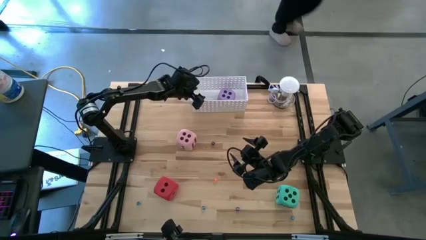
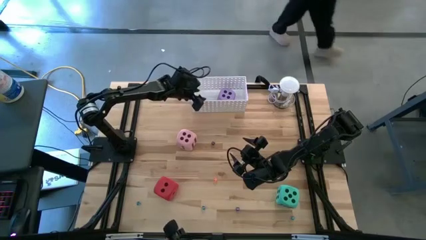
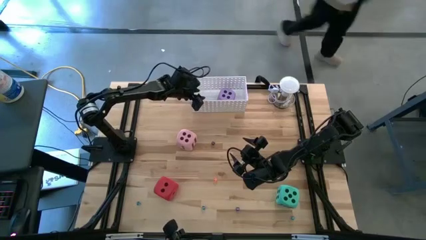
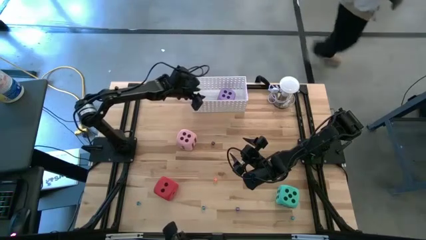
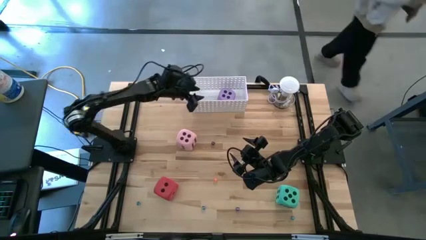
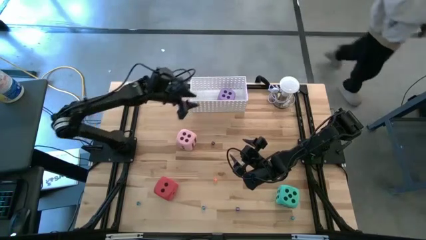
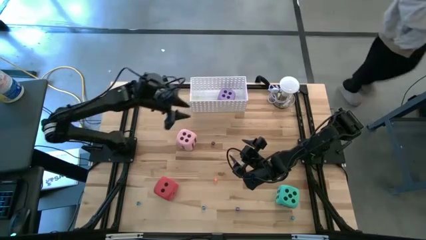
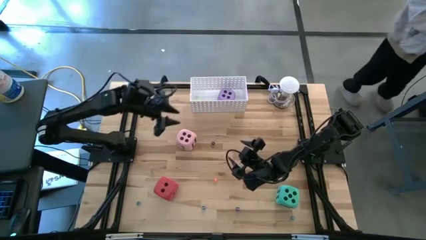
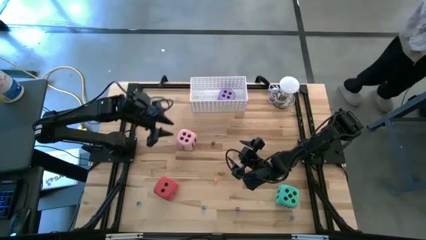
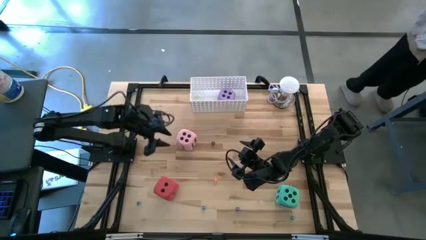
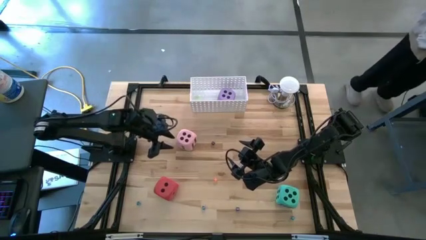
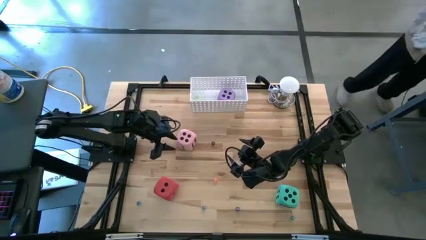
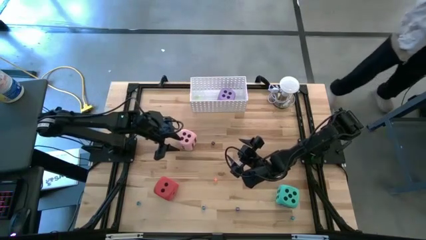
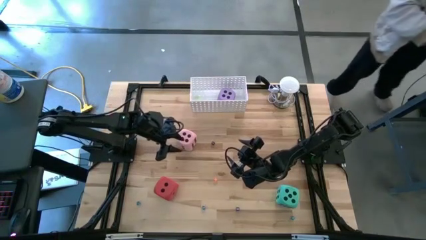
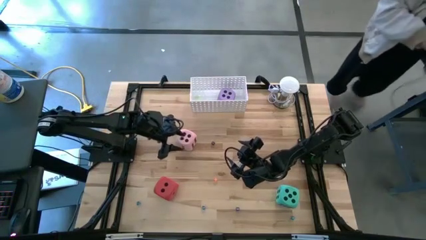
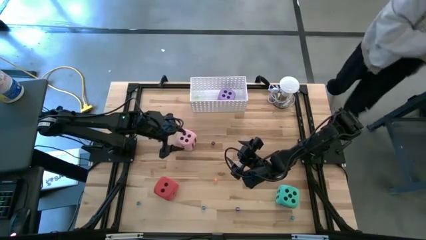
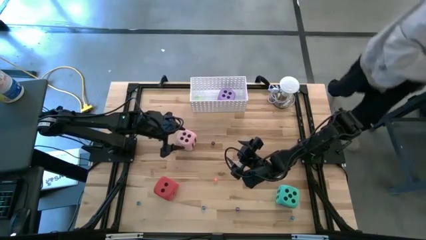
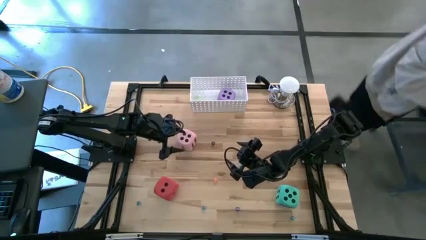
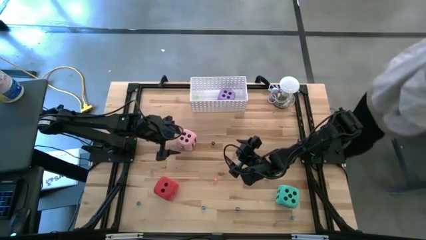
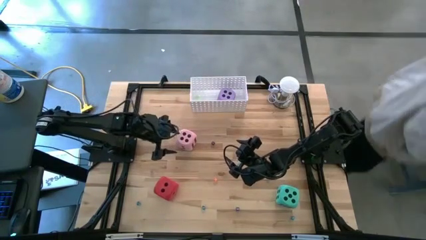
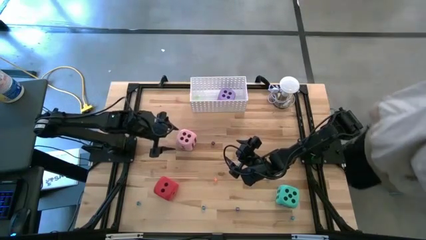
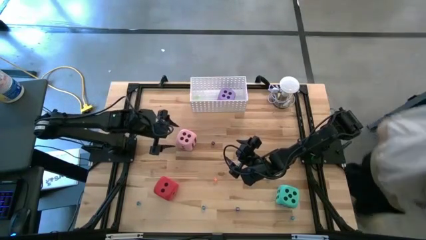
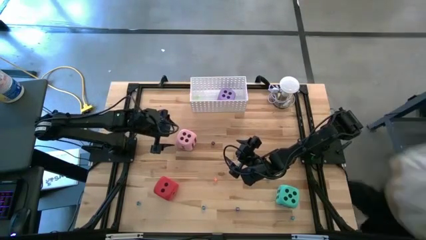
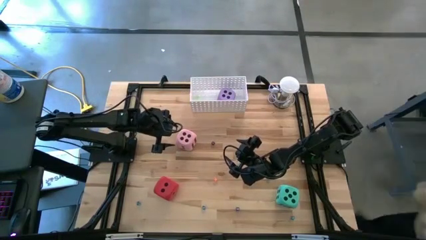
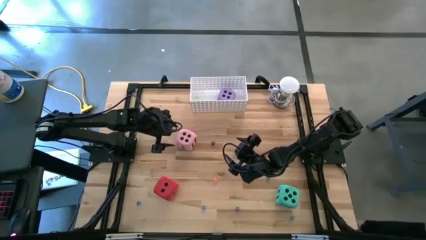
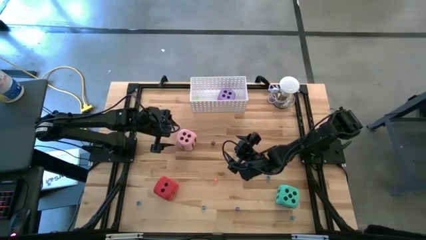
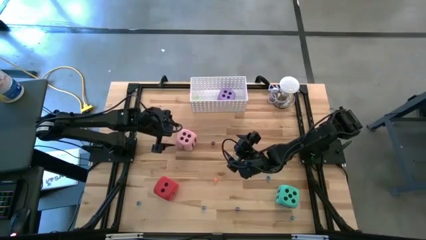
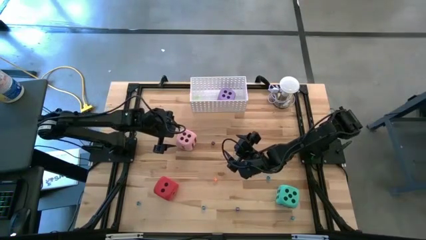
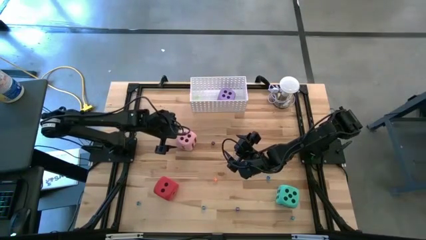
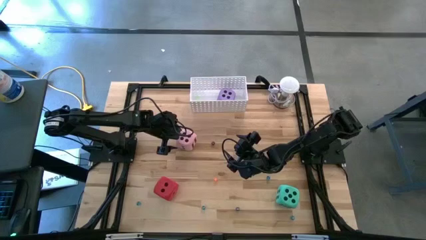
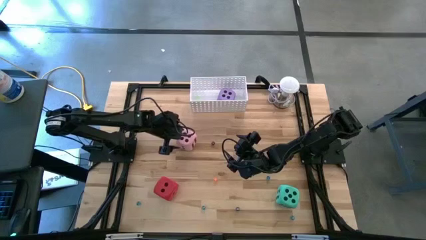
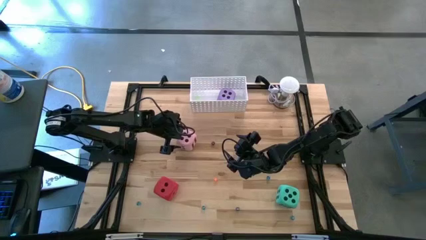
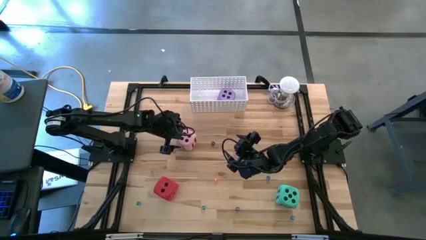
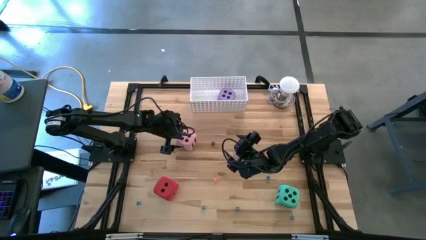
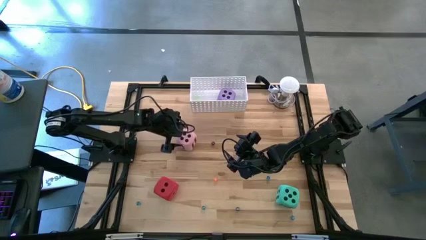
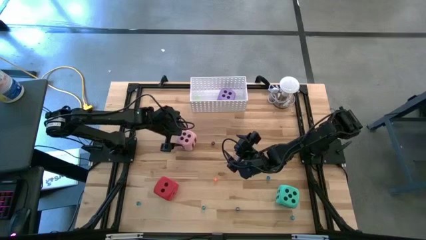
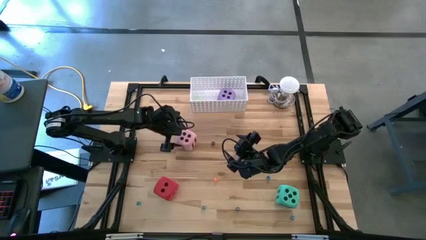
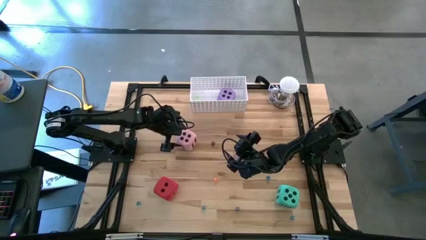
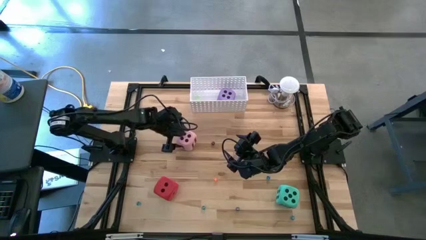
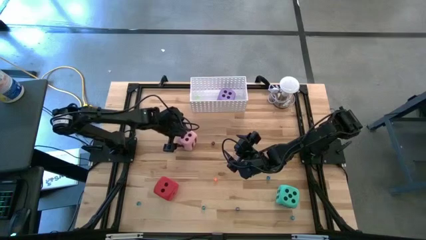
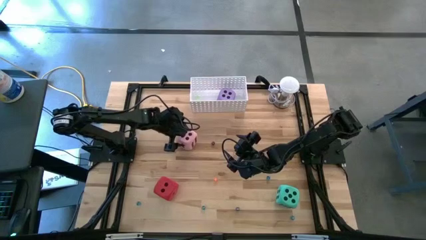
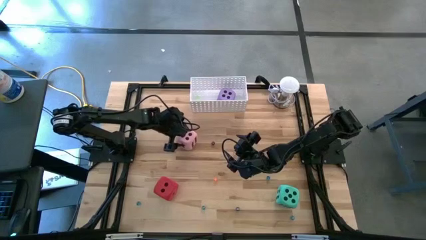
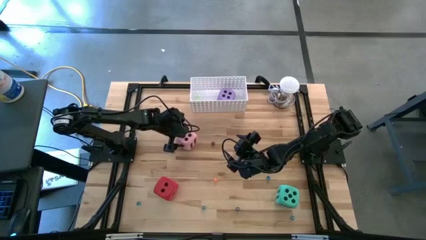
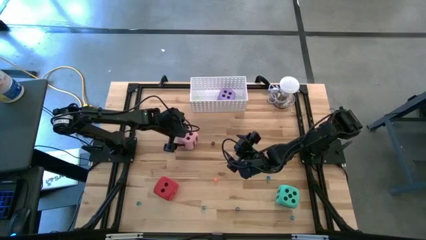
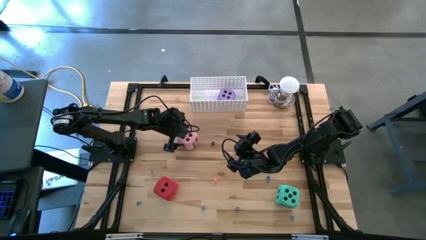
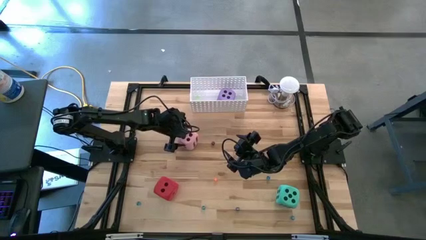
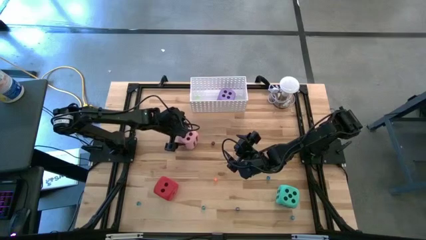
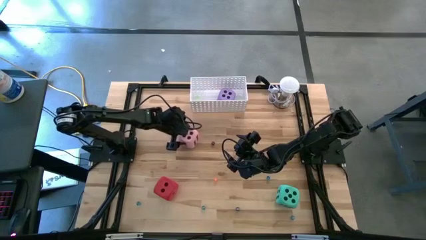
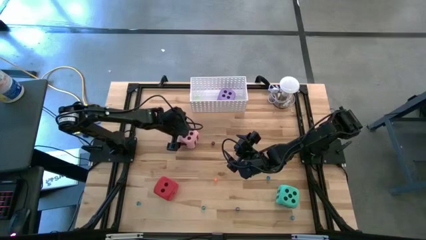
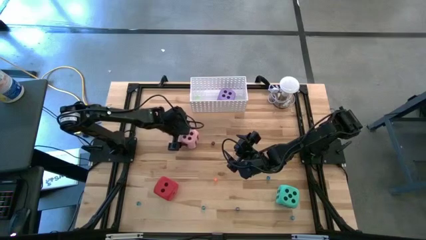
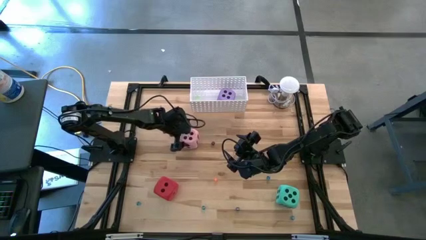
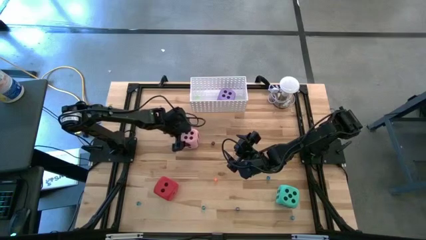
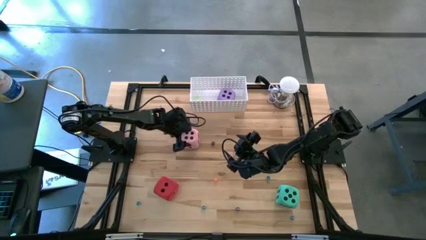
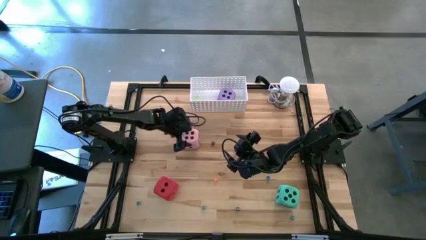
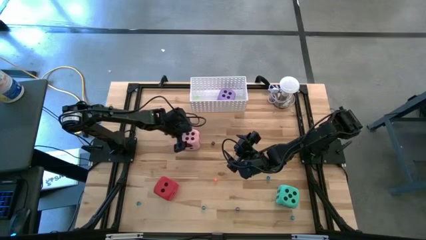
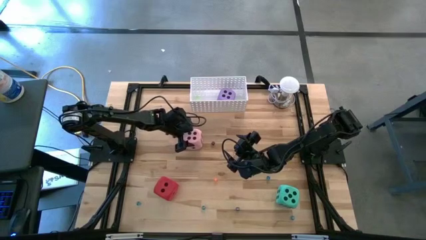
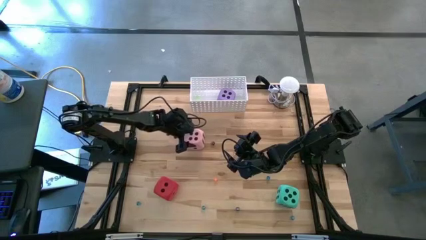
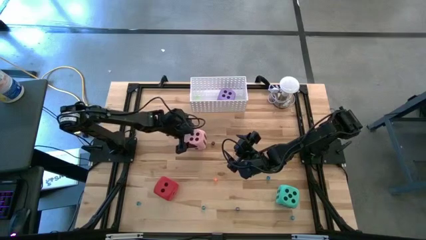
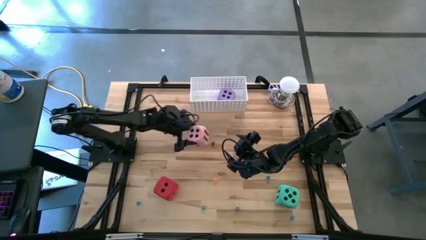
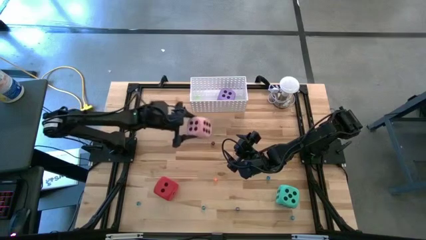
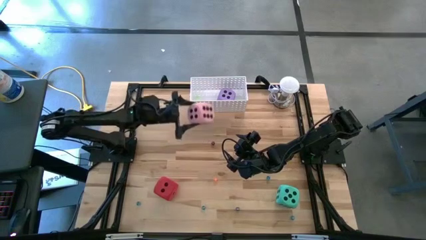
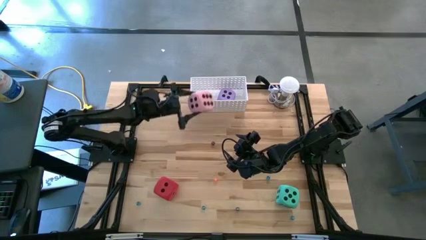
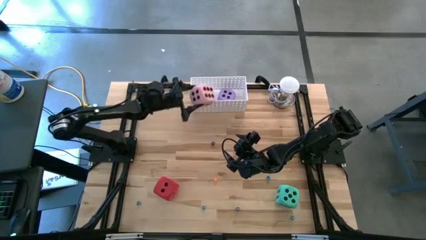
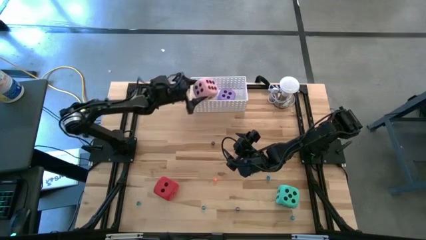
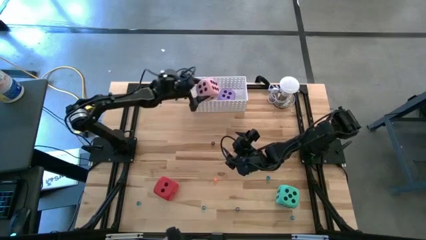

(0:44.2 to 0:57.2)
Task: Pick & Place Dice
Put the large pink dice into the white bin
